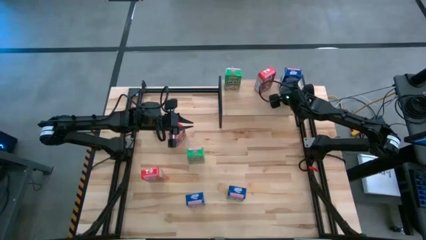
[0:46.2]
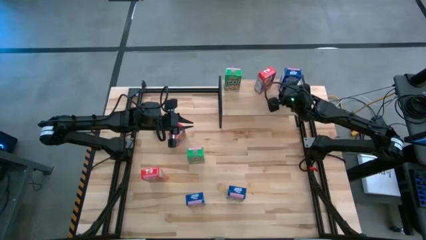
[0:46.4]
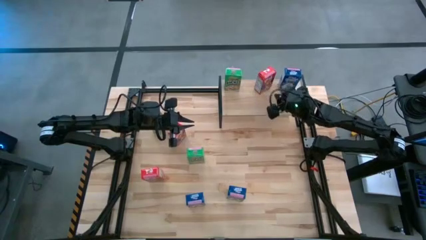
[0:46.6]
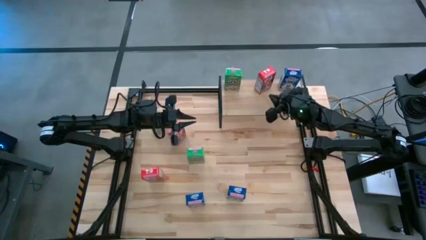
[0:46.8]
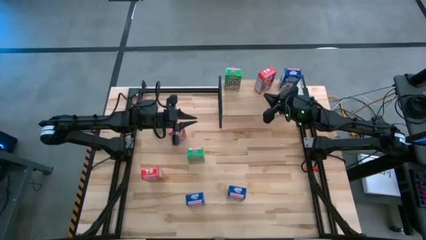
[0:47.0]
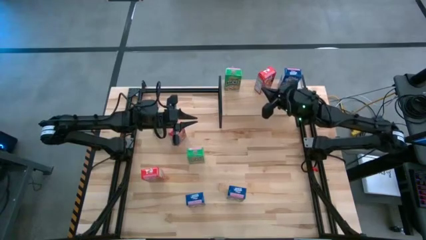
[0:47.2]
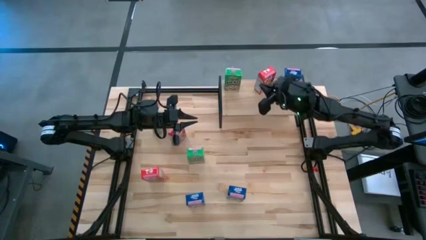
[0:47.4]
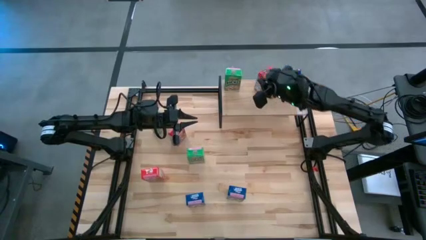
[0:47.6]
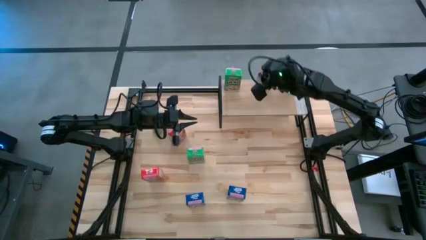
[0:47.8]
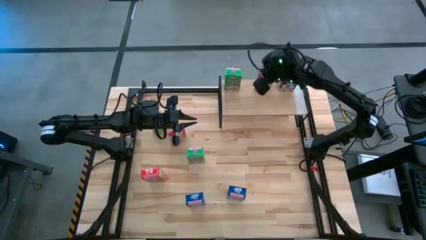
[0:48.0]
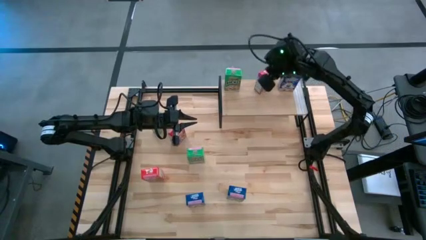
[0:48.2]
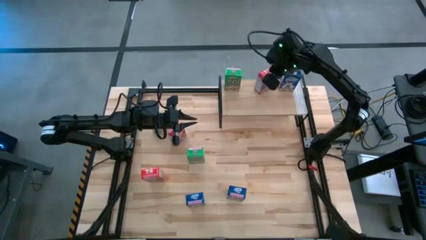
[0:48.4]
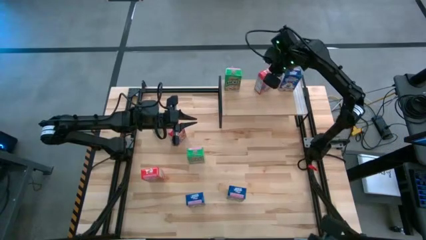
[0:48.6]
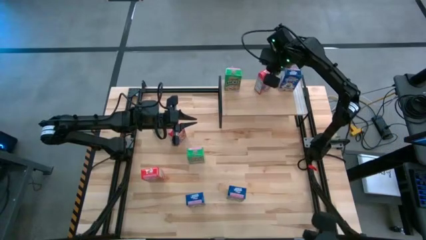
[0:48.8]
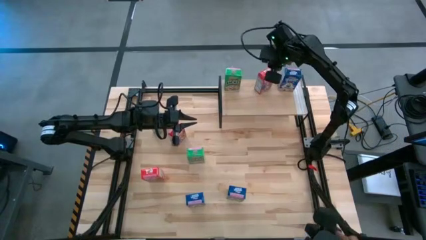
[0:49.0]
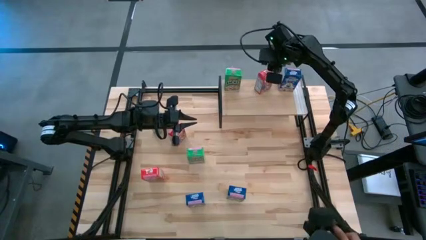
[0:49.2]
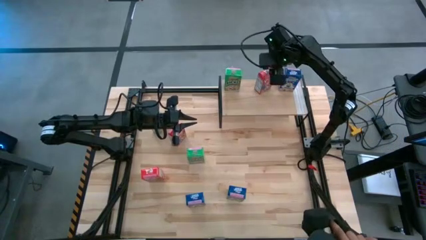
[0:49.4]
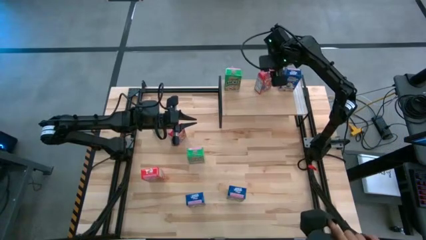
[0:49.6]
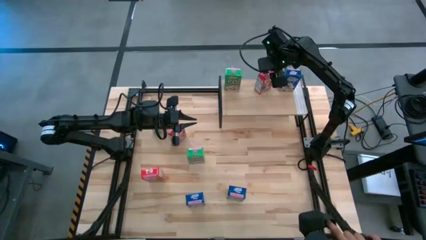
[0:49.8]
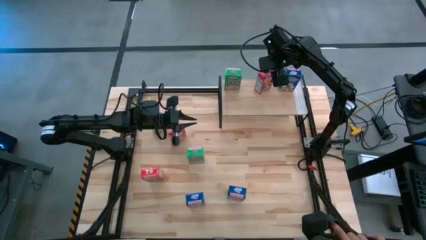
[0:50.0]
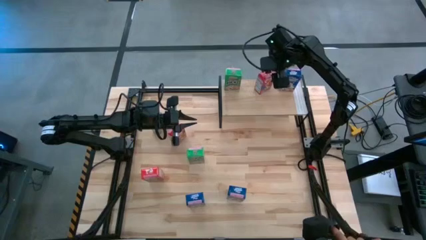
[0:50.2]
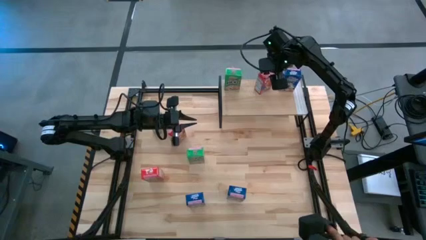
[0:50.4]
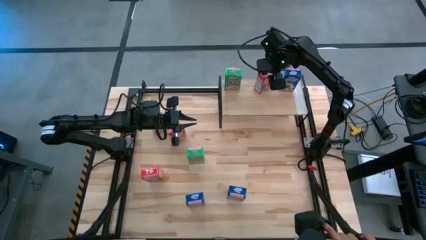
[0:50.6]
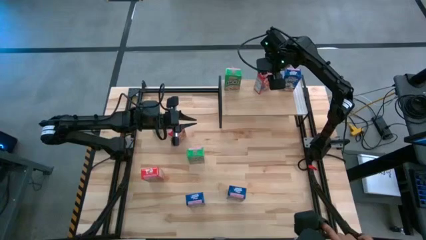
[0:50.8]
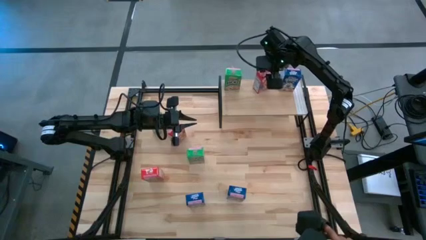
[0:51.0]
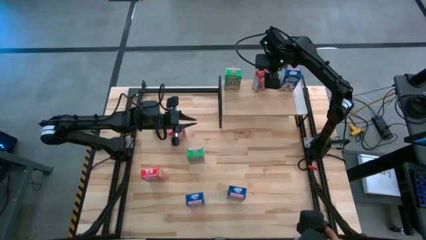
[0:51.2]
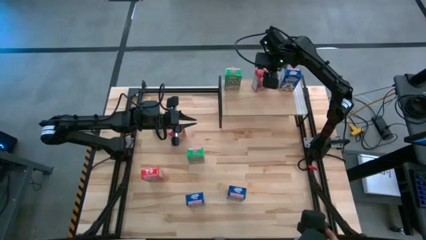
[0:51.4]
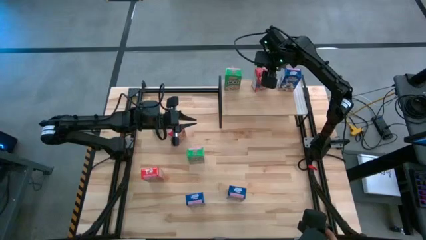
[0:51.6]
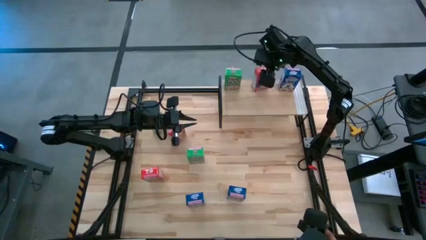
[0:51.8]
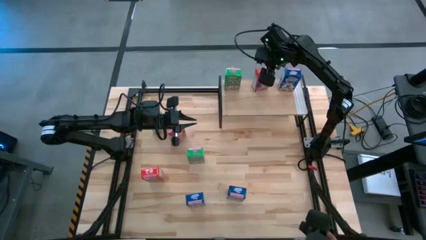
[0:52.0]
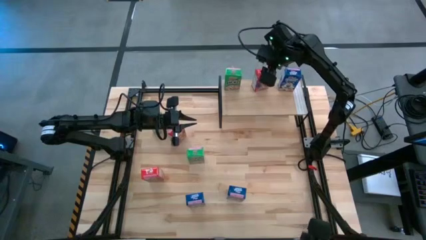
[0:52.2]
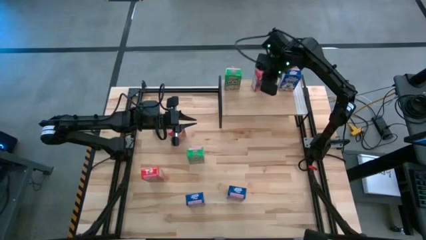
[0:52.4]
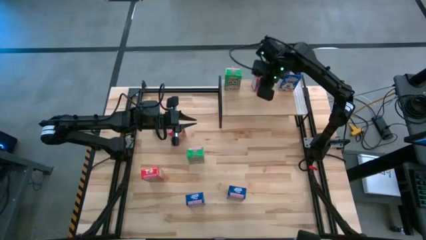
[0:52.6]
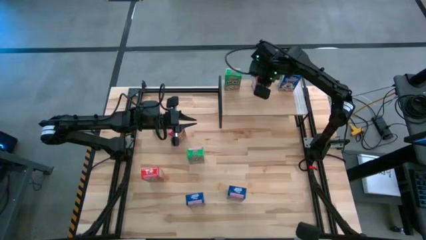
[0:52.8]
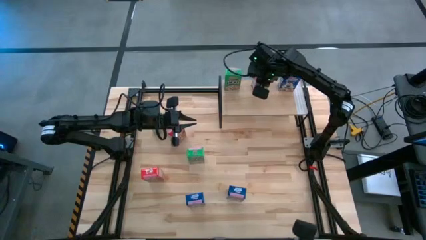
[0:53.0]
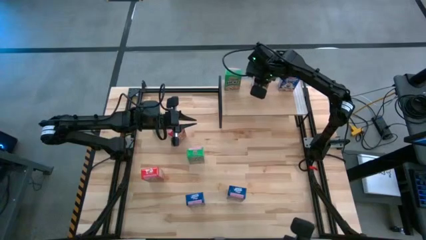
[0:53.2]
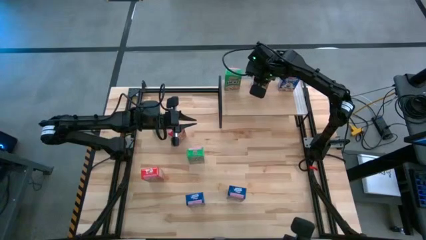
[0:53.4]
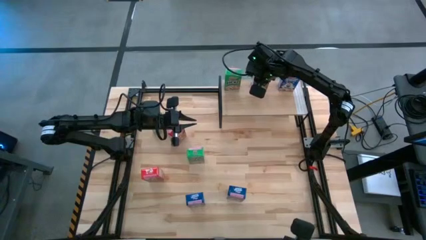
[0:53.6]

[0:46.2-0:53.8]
Task: Stack cereal on shelf
Adjust the red cereal box on the shelf

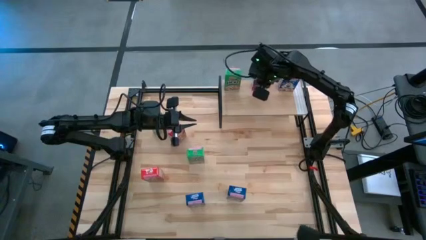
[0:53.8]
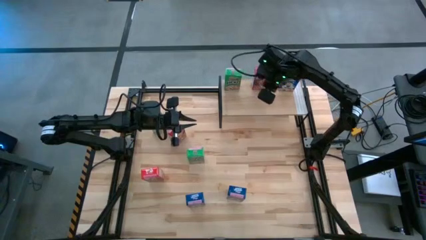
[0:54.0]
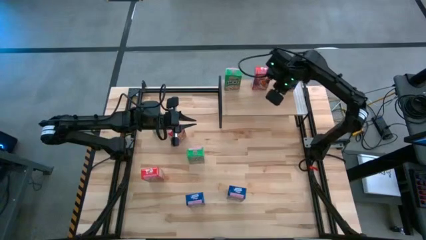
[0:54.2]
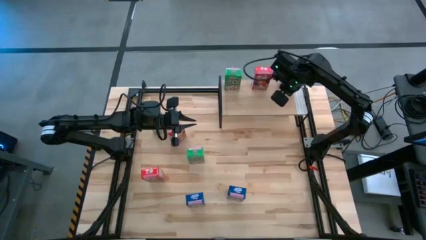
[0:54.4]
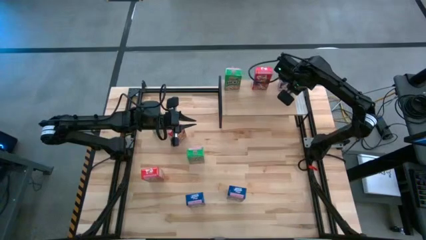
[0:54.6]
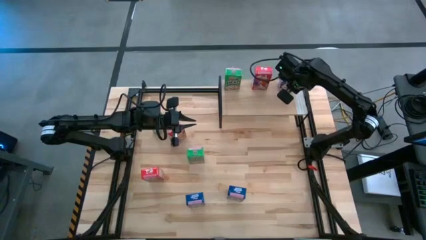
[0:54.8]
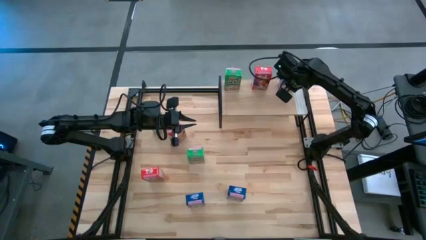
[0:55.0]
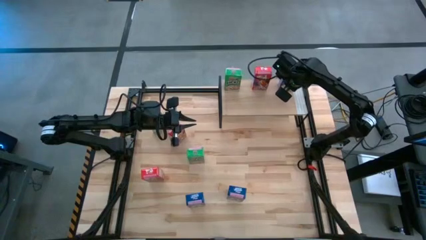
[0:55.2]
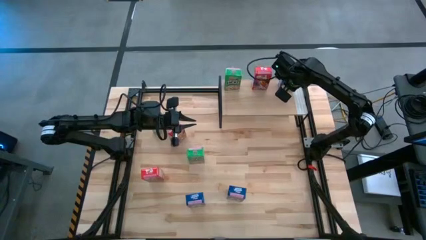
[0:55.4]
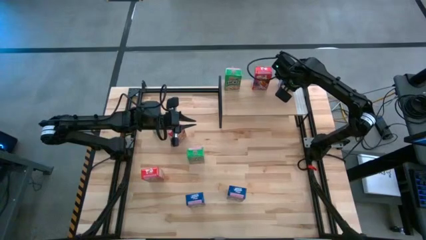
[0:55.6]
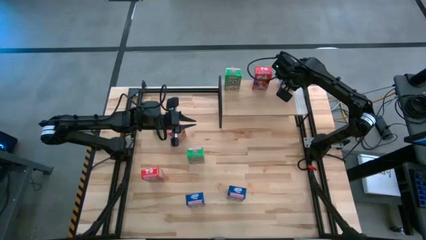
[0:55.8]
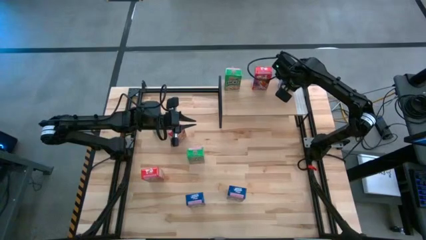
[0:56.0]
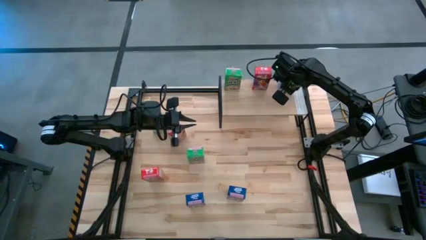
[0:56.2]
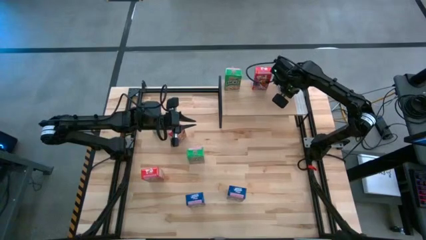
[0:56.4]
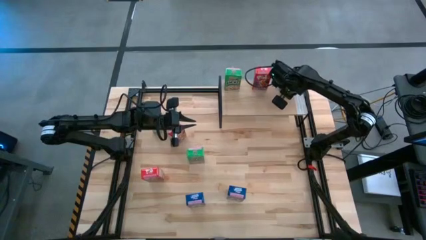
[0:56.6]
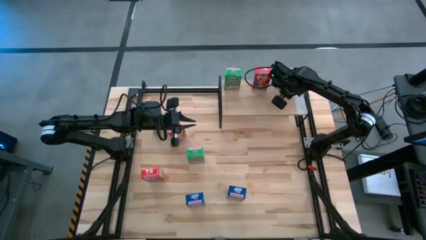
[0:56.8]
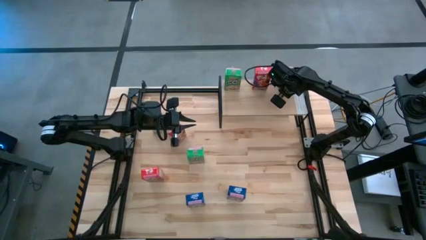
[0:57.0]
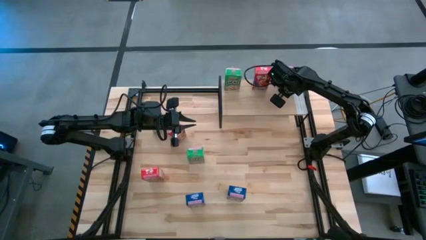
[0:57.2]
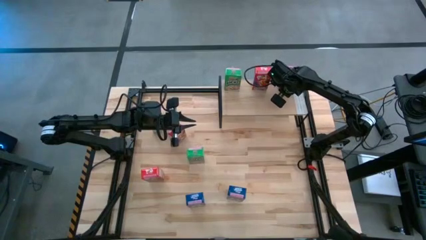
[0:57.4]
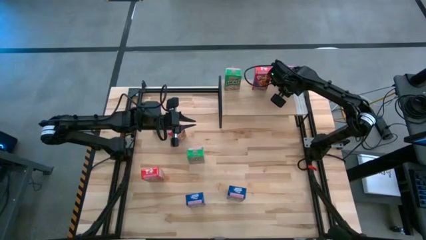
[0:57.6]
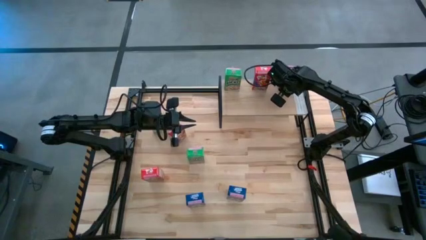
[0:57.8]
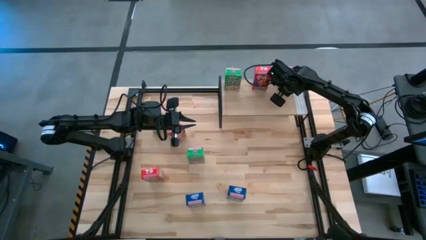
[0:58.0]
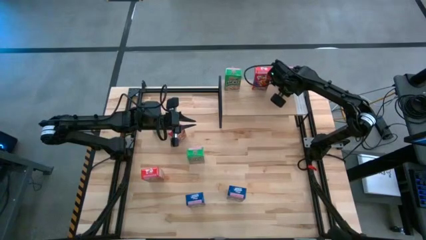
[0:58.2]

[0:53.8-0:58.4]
Adjust the blue cereal box on the shelf

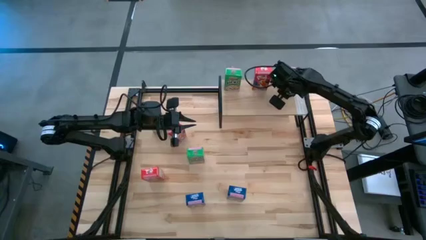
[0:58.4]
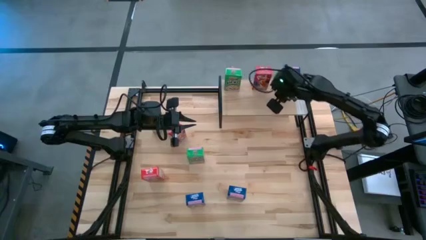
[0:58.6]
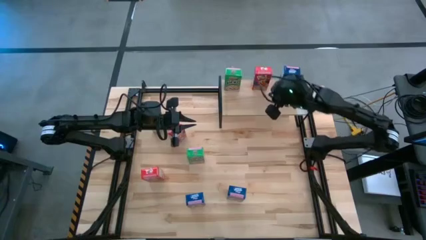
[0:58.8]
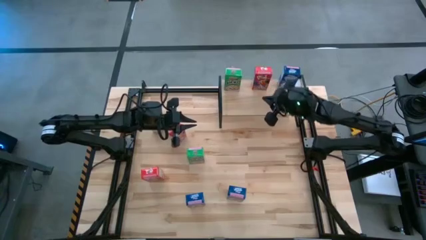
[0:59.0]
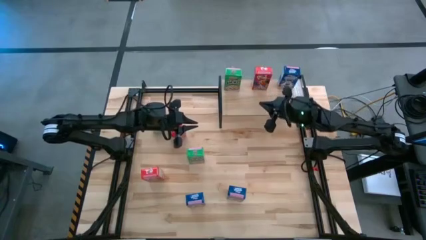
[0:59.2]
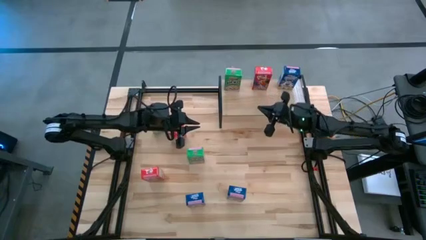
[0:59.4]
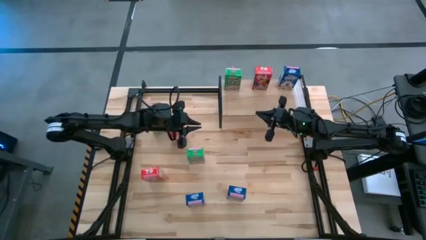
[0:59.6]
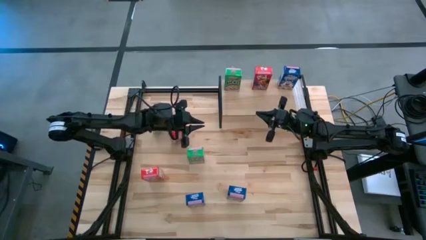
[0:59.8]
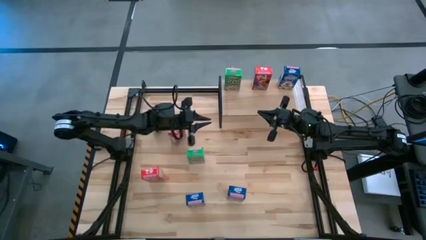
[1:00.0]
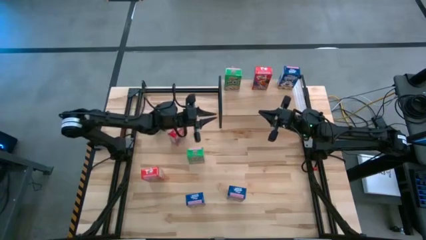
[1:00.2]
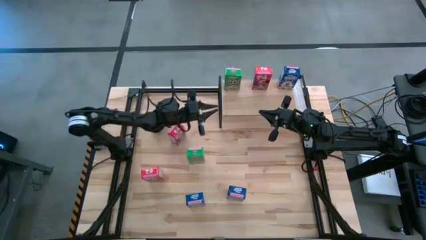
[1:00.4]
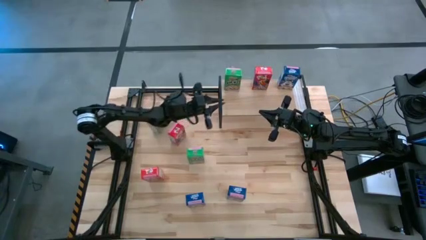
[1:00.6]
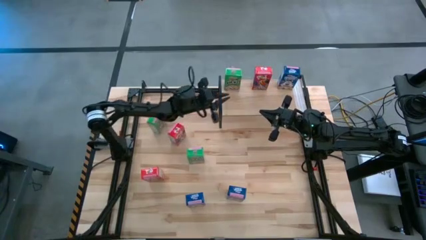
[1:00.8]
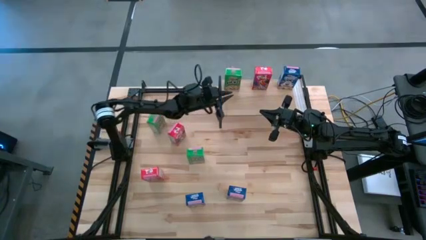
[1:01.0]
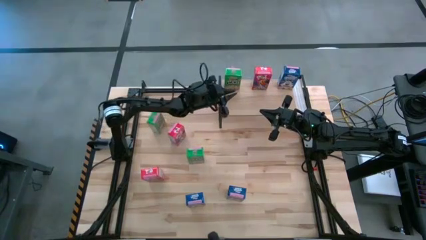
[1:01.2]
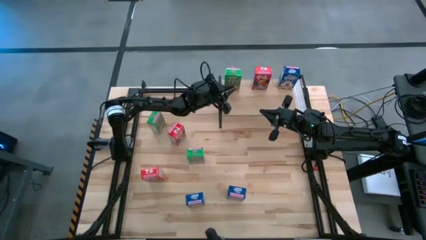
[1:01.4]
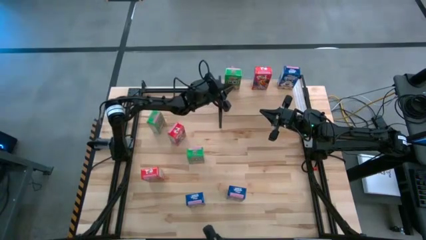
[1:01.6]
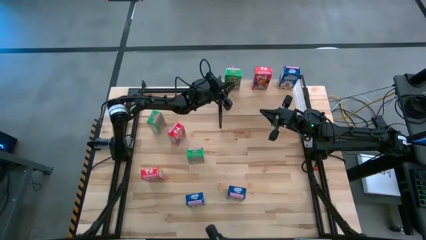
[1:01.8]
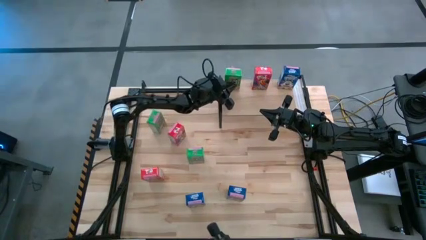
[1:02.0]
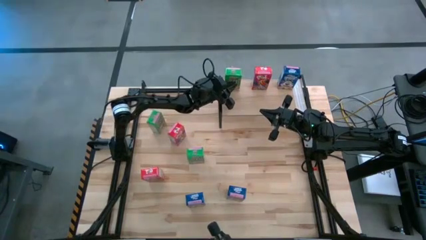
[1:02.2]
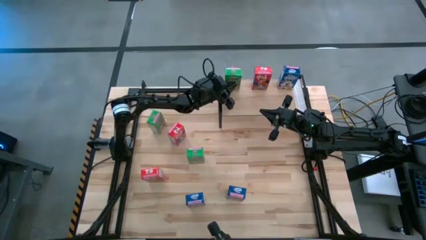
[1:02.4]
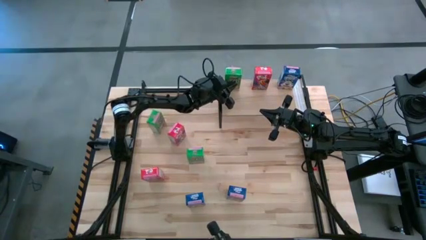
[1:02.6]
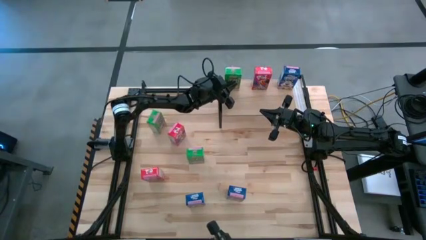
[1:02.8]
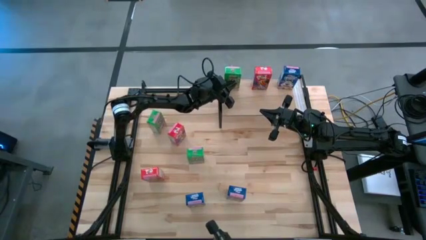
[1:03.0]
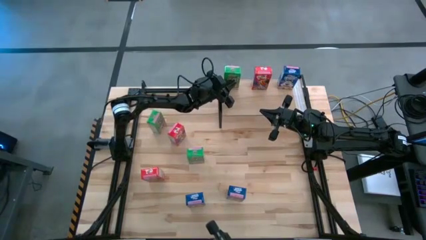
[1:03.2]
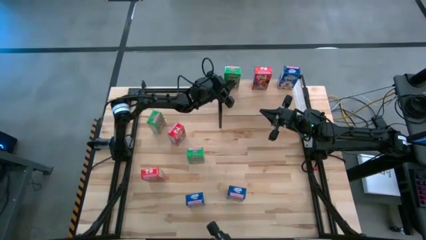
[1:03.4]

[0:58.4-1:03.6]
Adjust the green cereal box on the shelf
